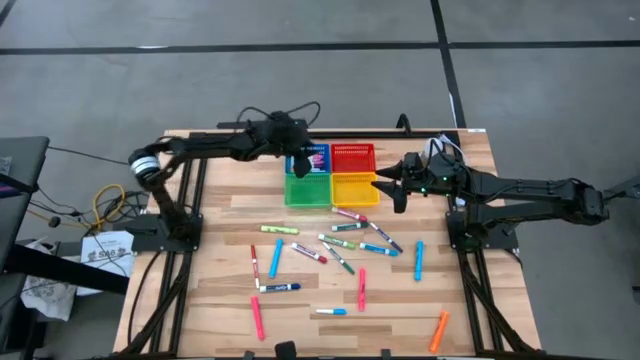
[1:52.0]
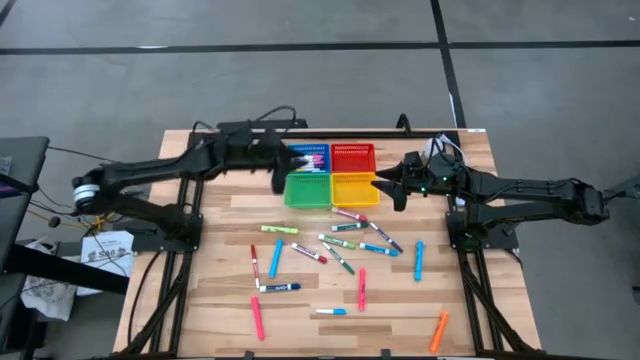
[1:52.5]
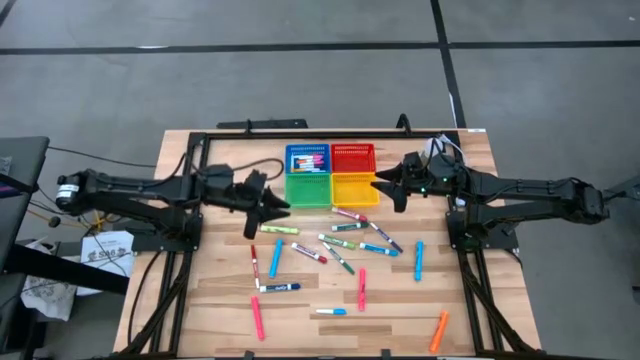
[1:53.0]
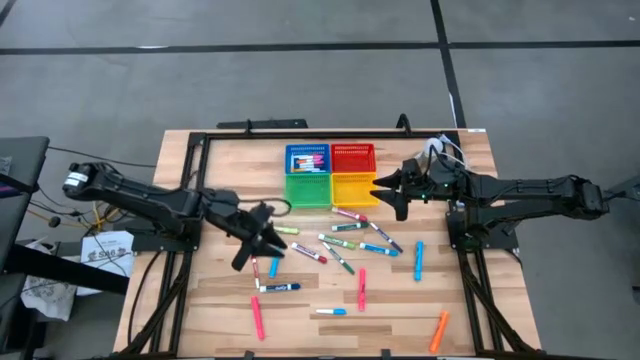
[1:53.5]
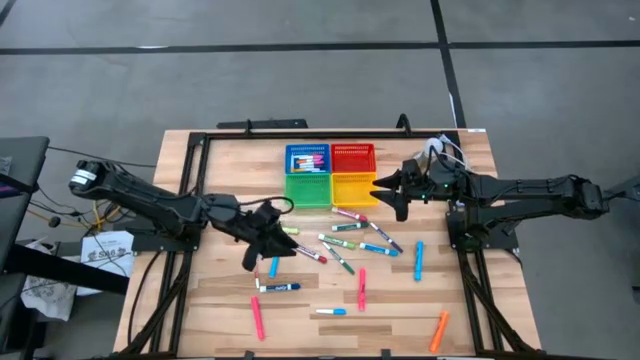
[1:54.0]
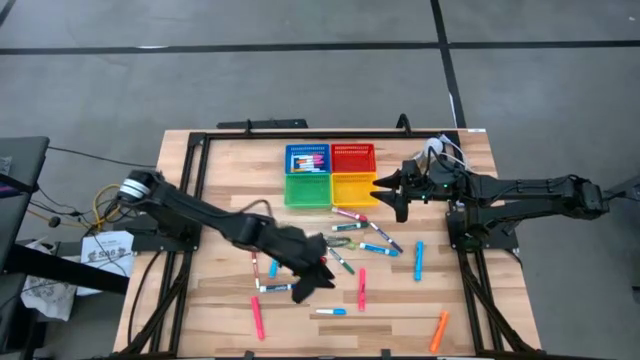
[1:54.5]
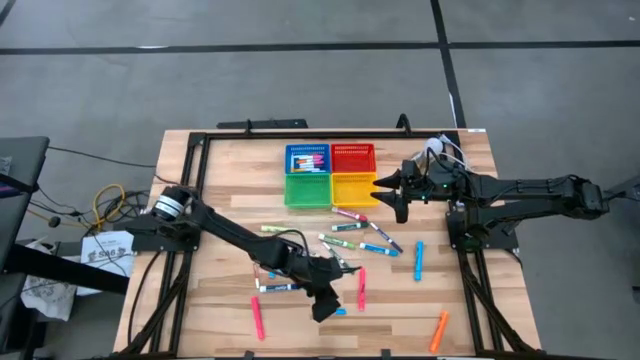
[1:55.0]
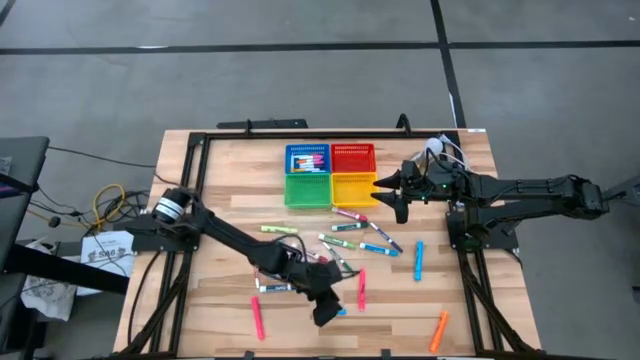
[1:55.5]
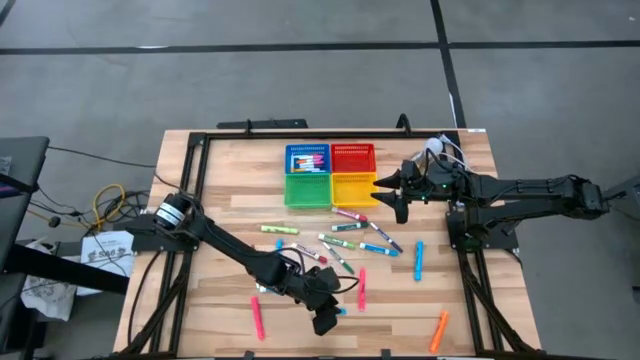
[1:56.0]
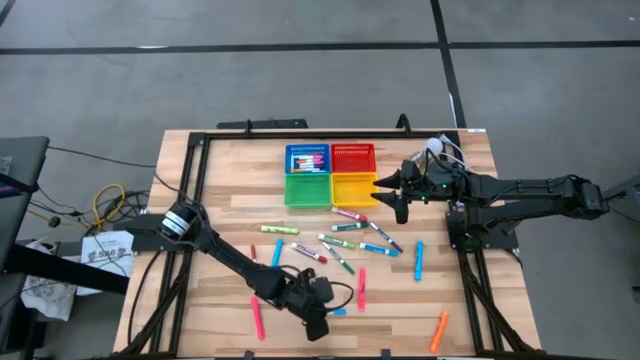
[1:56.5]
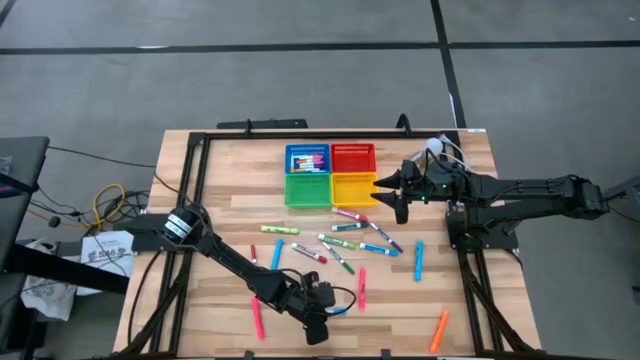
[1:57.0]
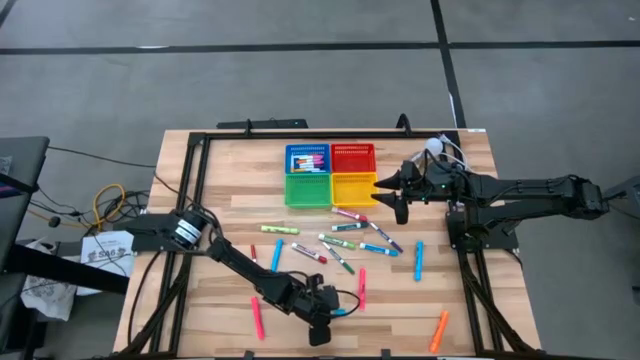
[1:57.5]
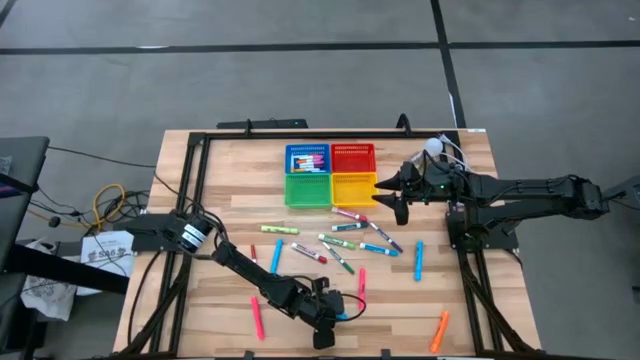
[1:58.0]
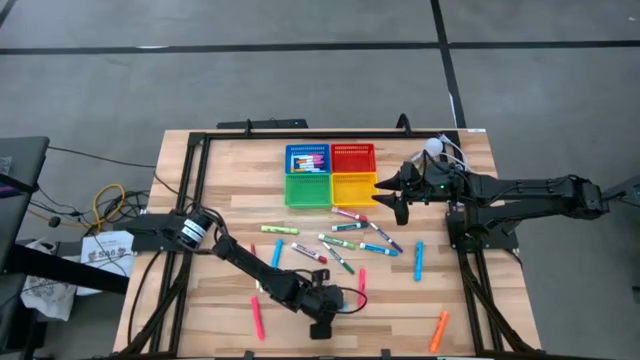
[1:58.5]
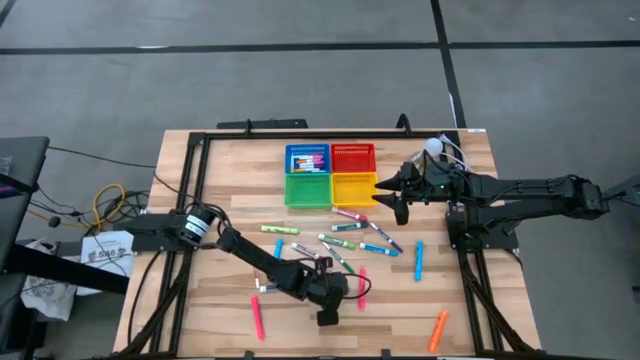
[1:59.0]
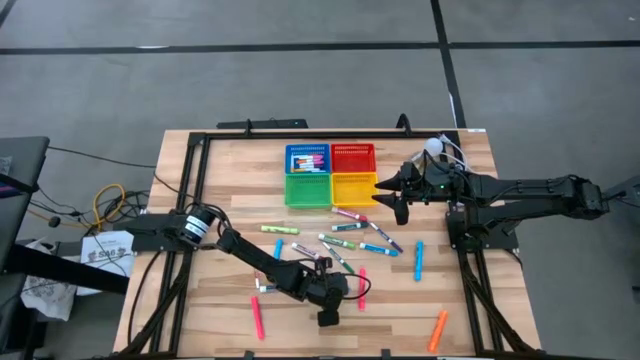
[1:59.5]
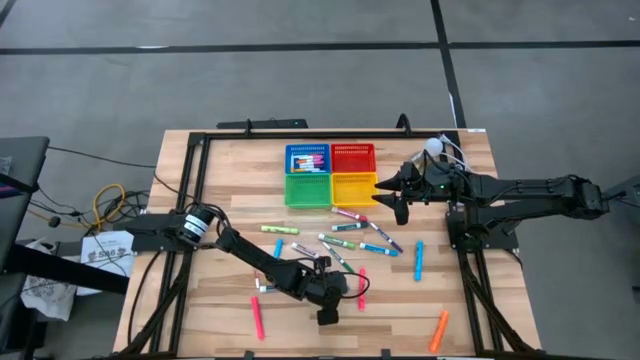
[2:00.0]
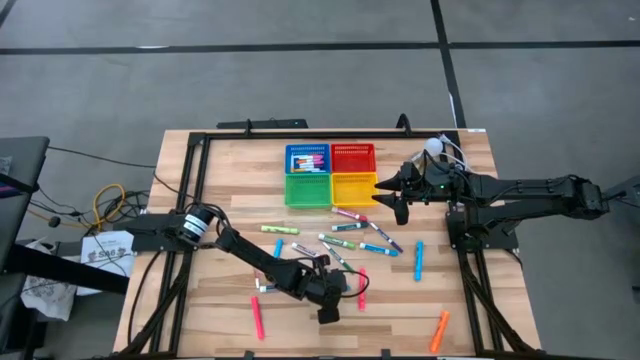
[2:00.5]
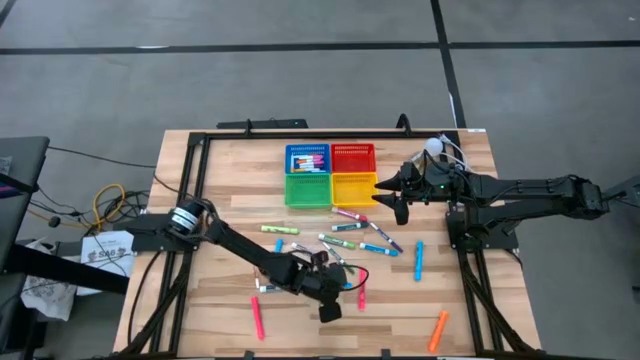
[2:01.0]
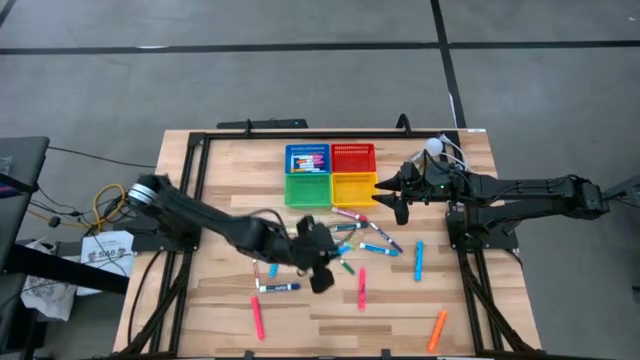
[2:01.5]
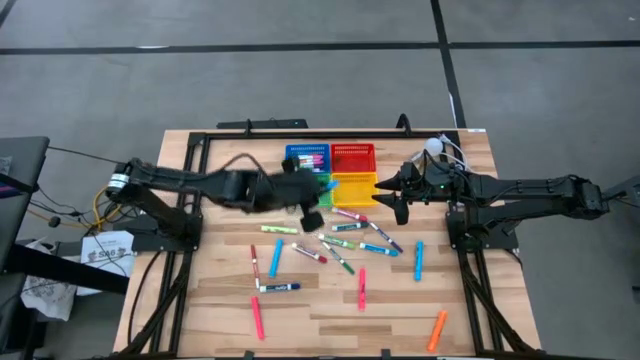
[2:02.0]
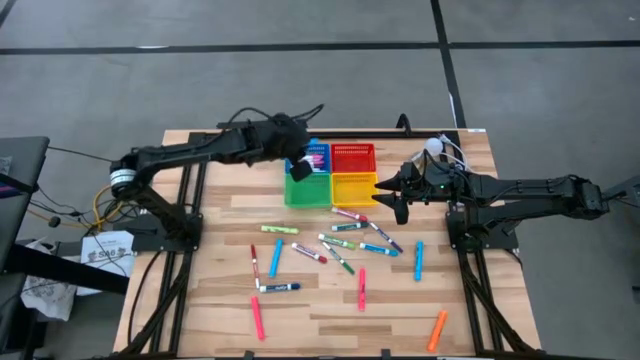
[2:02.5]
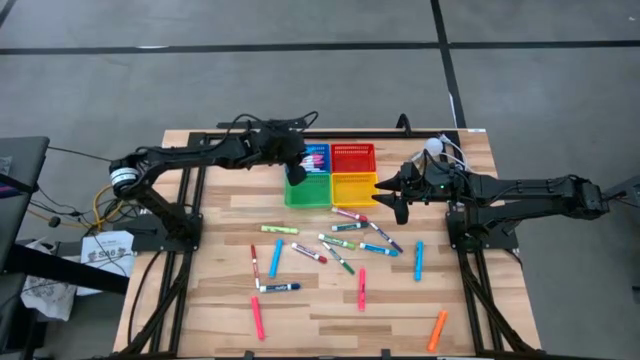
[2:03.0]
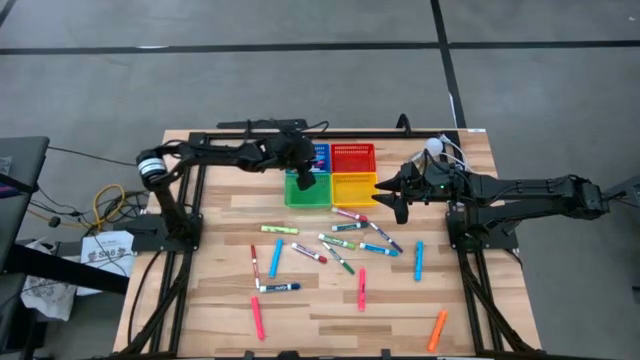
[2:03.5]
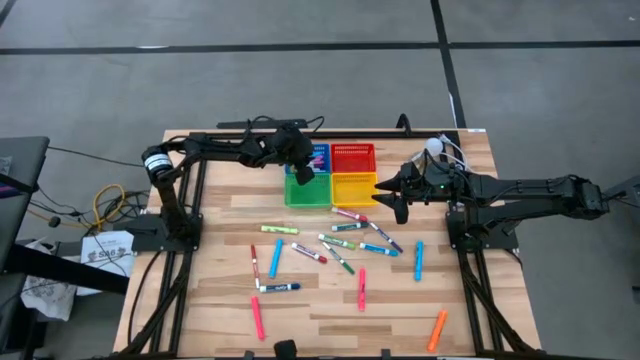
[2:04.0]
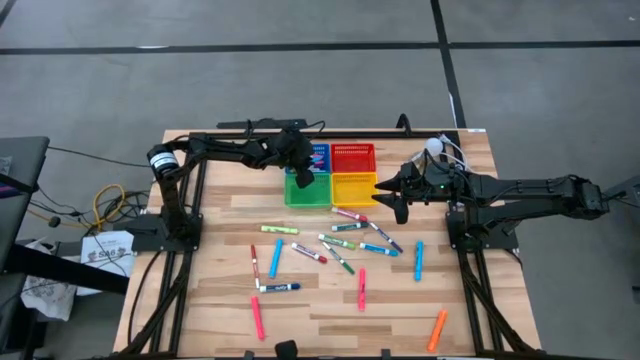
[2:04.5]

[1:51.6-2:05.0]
Task: Pick & Place Markers
Put the small light blue marker into the blue bin

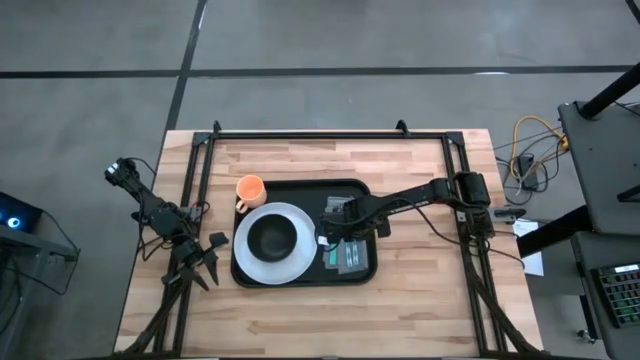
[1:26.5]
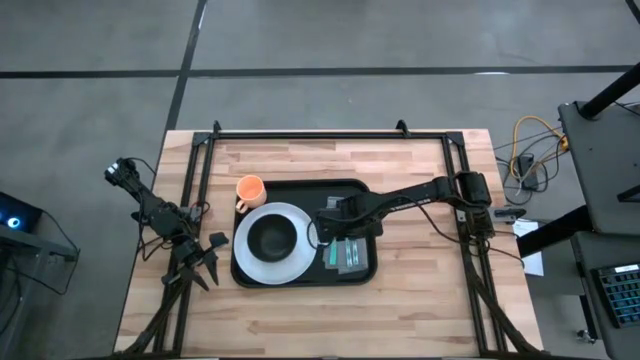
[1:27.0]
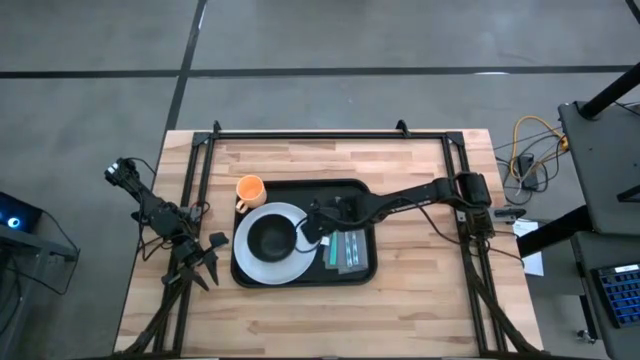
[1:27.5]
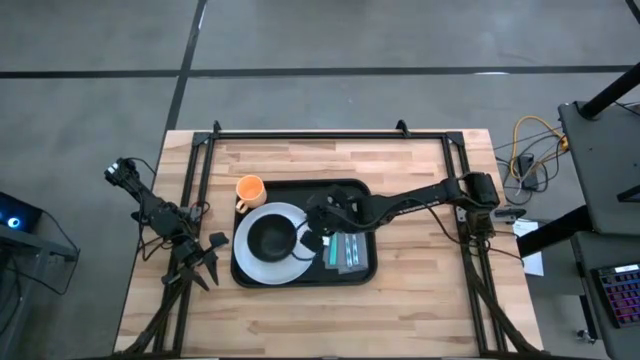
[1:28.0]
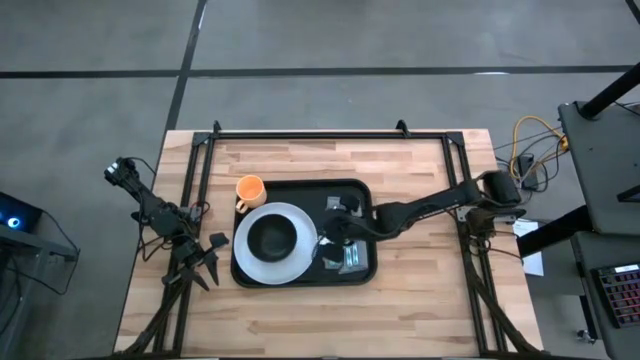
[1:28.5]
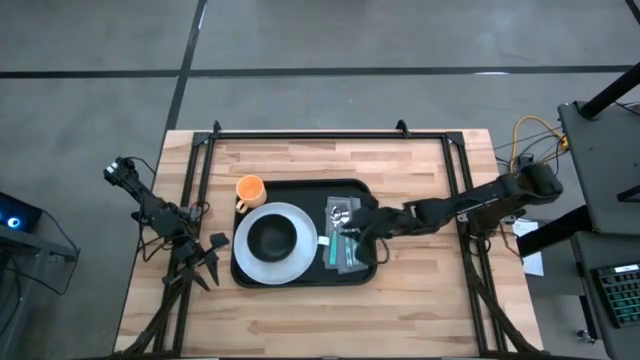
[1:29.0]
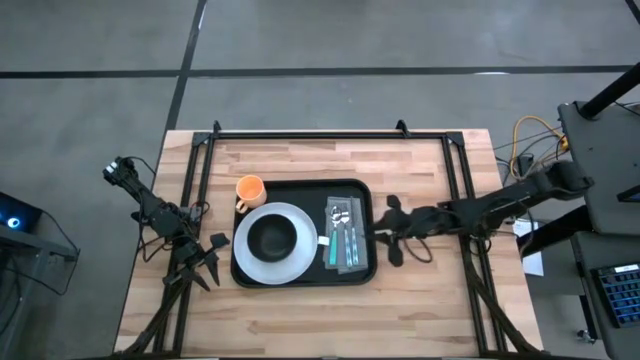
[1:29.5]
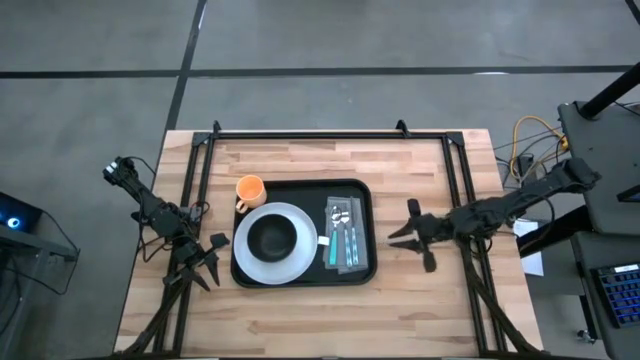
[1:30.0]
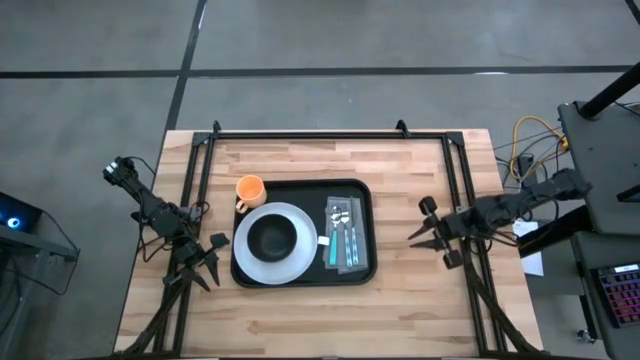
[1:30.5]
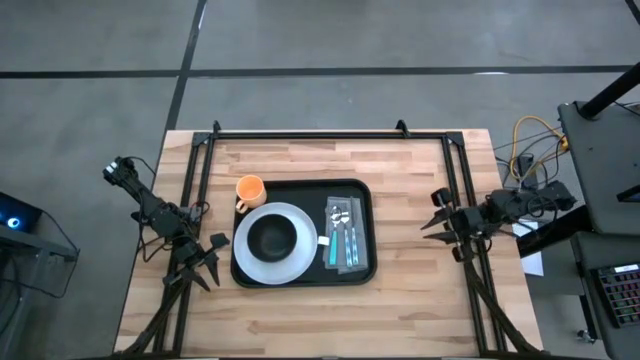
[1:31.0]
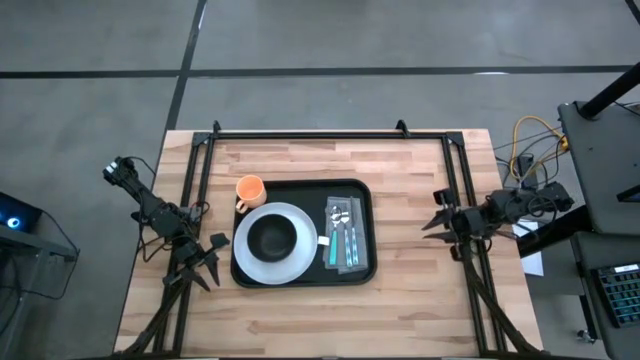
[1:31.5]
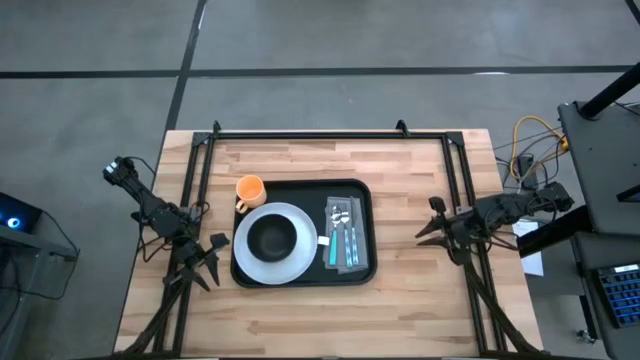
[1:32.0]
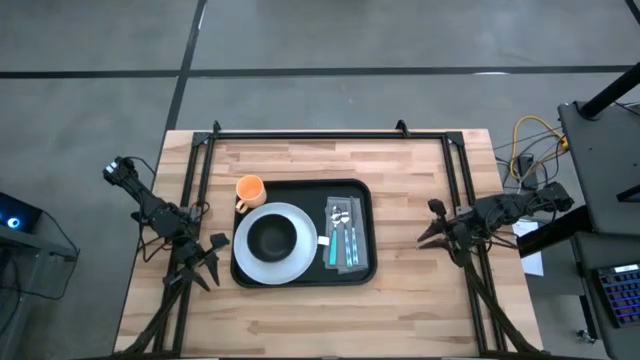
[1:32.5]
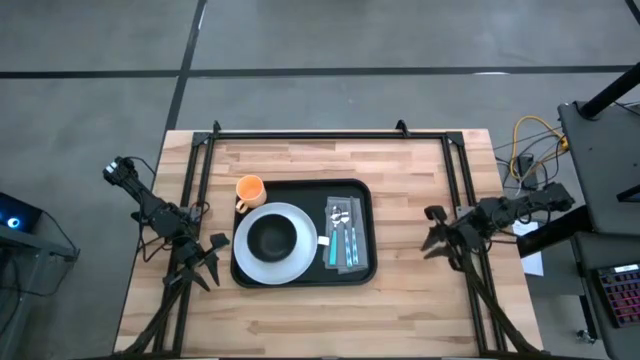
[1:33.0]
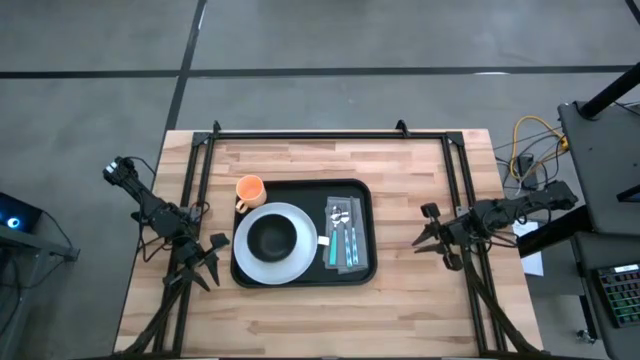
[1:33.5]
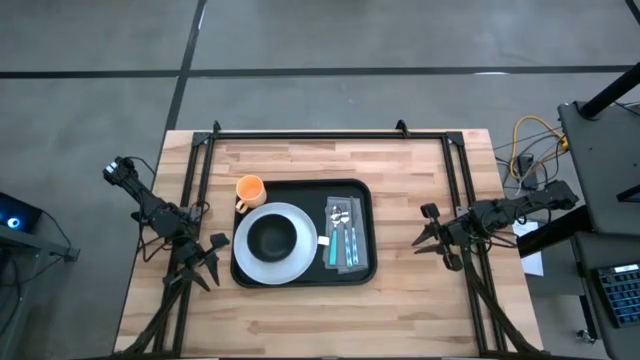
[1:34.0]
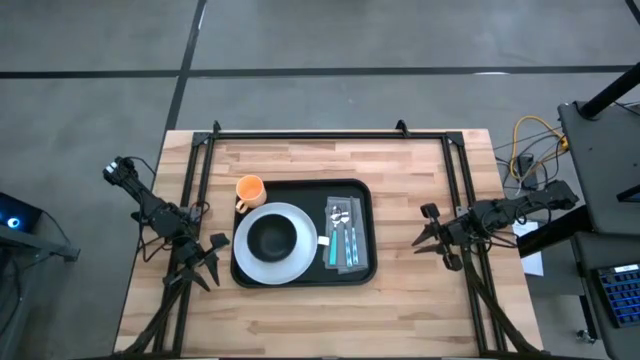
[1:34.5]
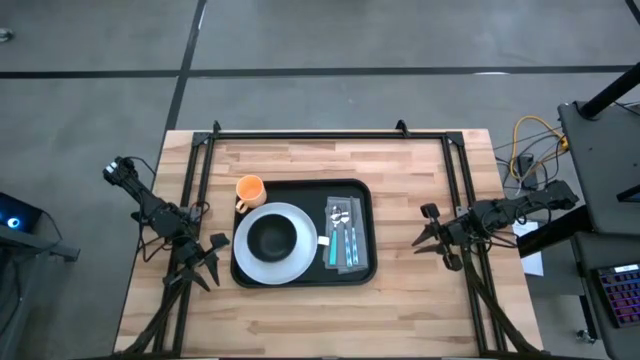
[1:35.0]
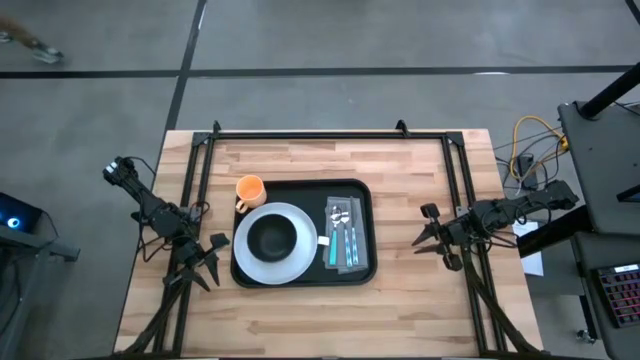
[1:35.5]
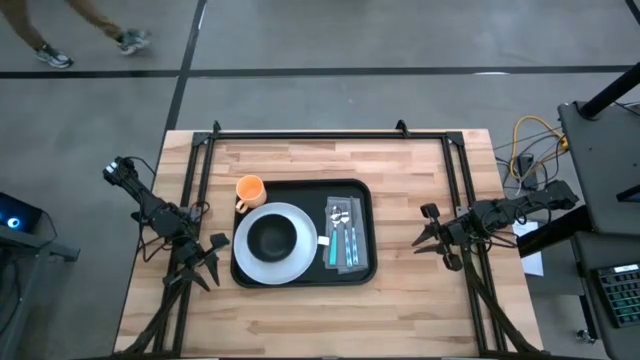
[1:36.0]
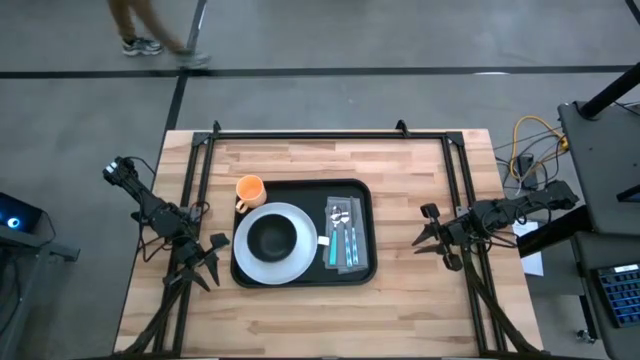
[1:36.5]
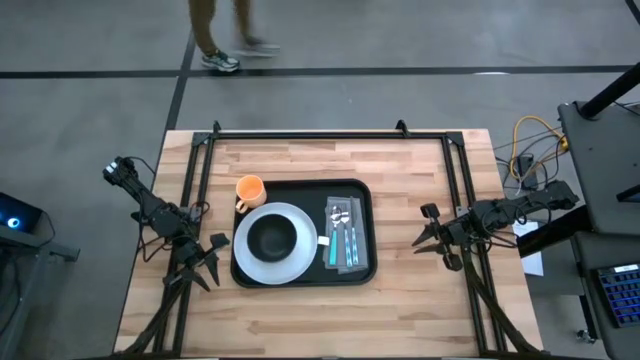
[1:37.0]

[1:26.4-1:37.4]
Task: Set up tray
Return to Home Position
